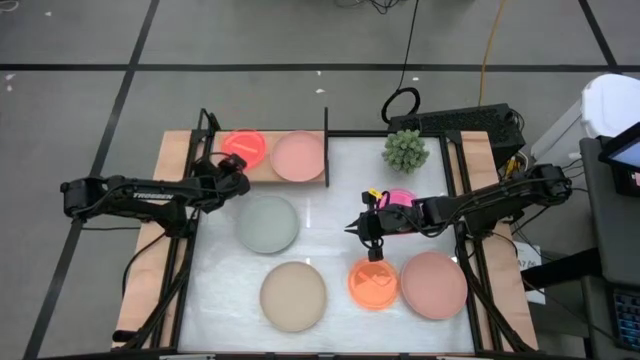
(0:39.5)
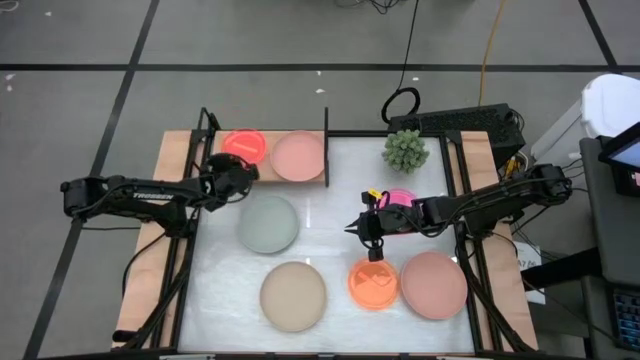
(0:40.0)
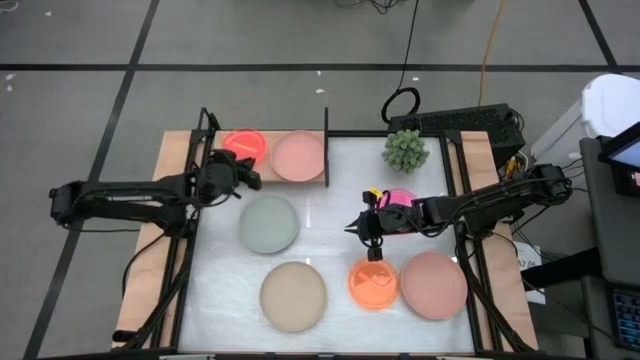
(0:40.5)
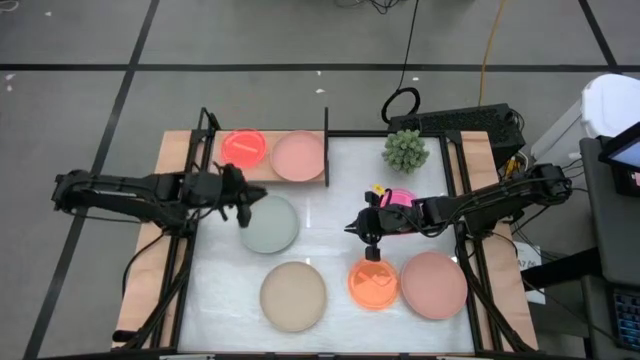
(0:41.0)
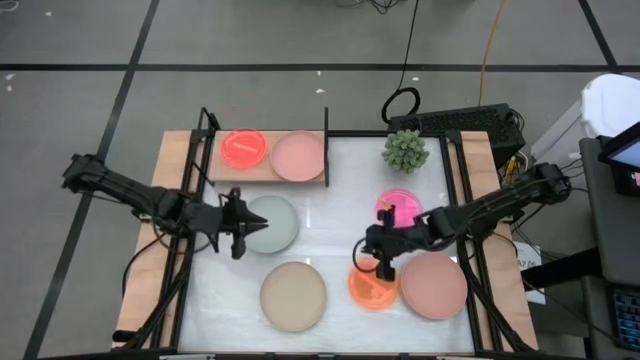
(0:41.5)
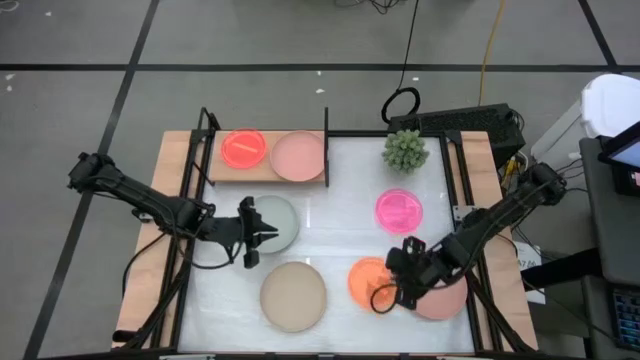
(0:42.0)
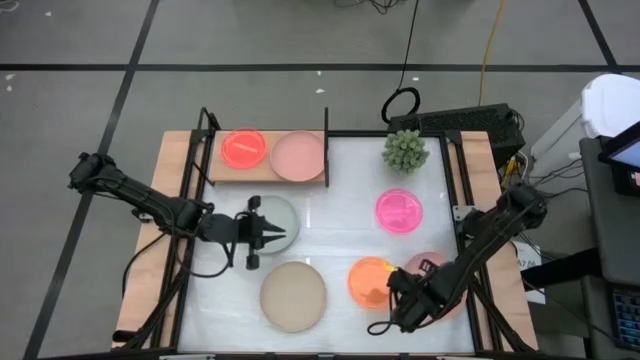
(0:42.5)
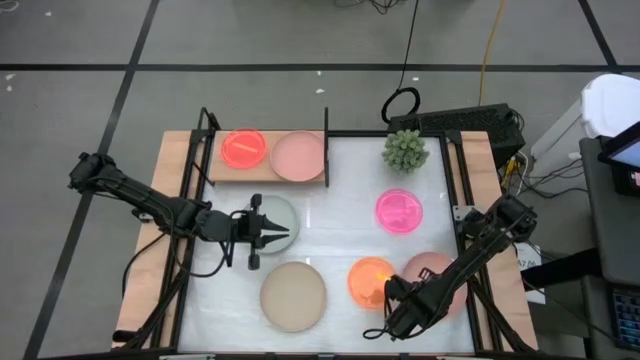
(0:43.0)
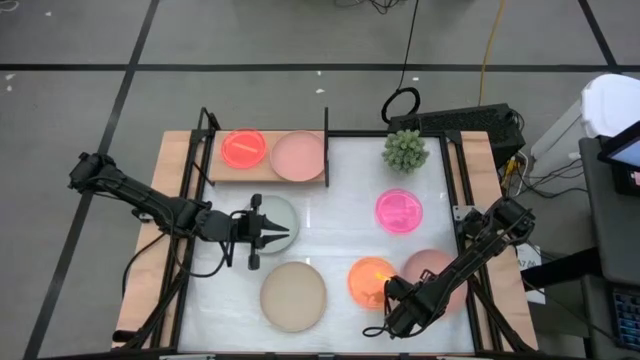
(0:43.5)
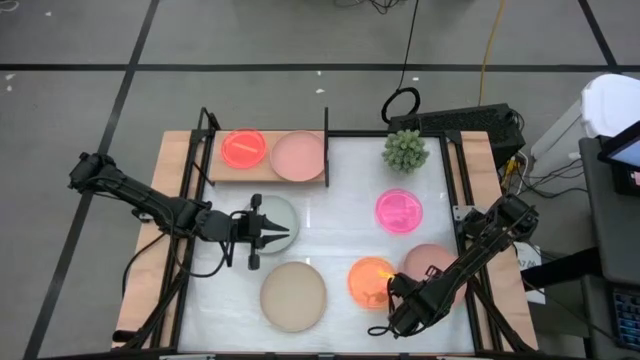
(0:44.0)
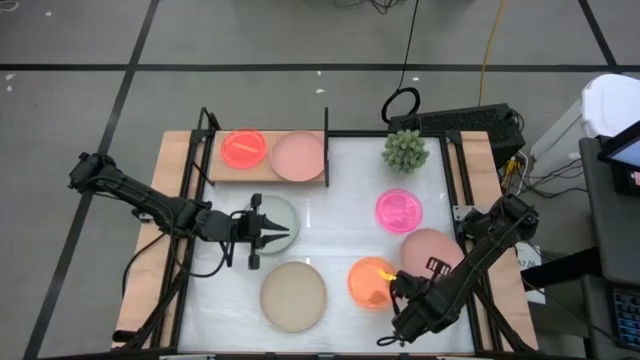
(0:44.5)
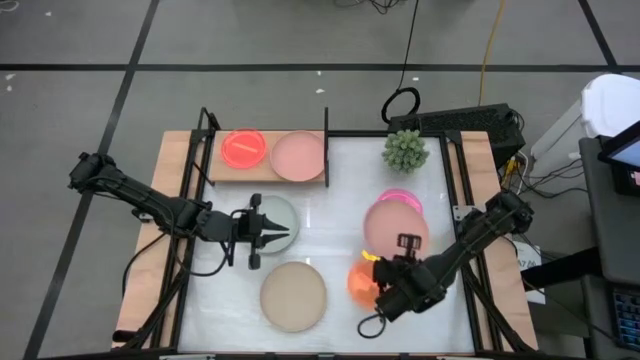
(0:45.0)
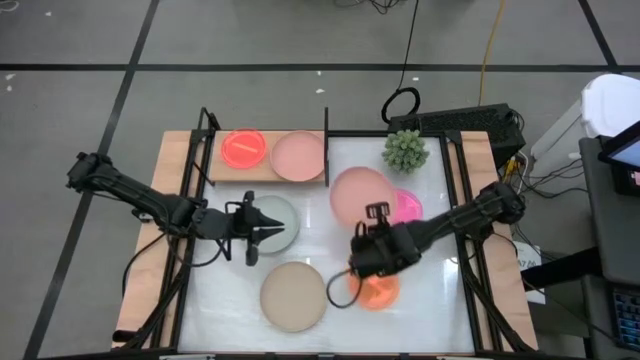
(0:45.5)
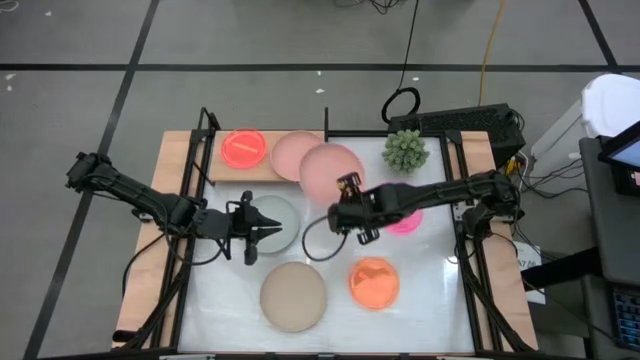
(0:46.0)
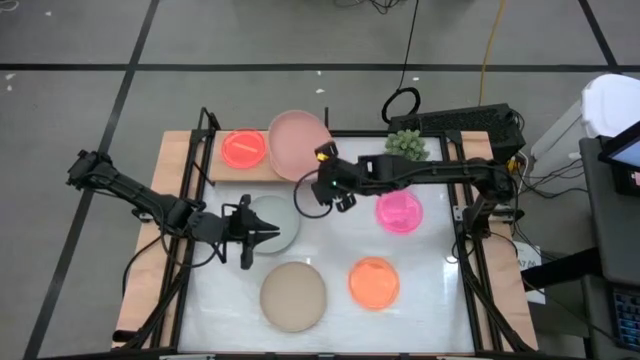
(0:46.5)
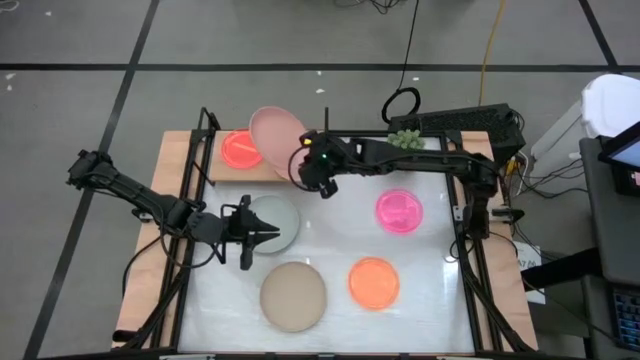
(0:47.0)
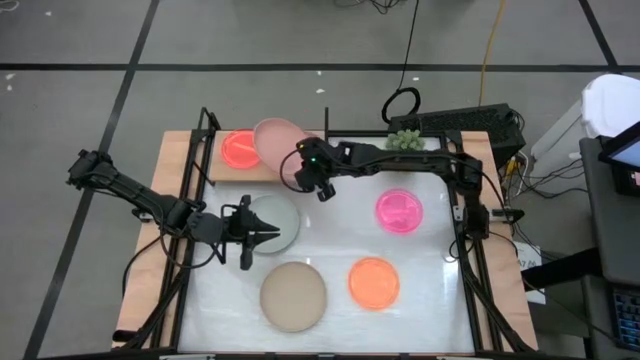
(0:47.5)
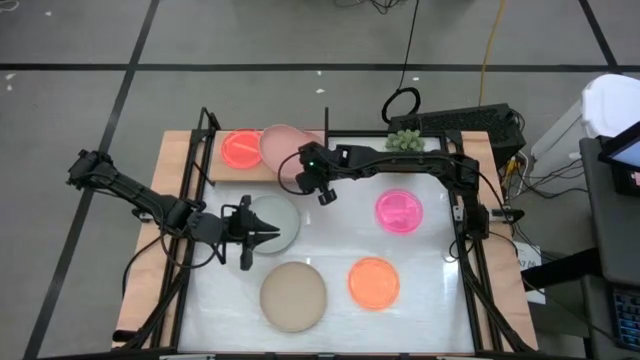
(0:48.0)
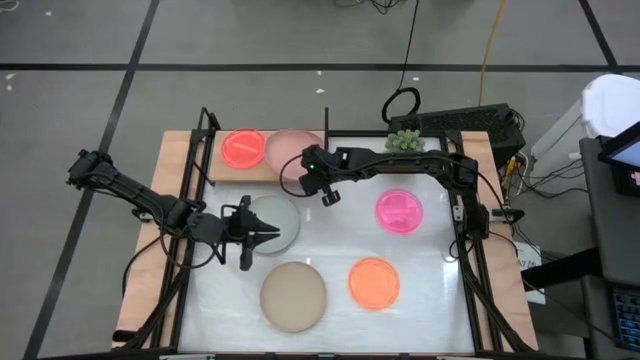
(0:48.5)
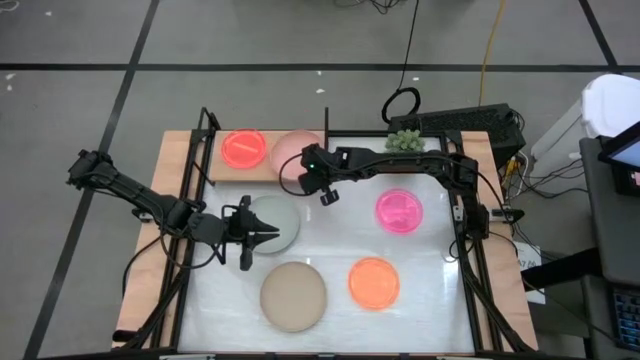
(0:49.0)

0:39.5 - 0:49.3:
Task: Place and stack plates onto a shelf
Stack the brown plate on top of the brown plate on the shelf

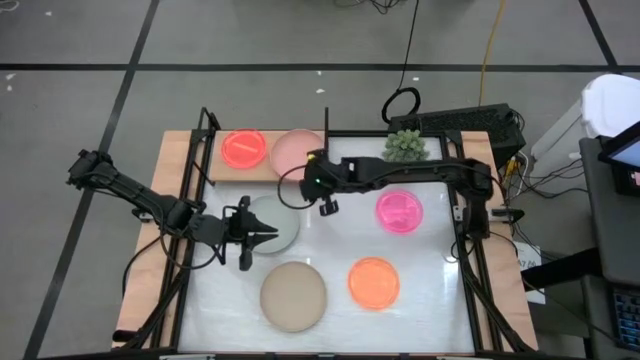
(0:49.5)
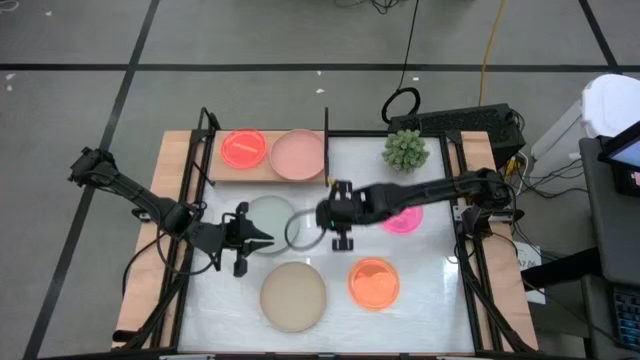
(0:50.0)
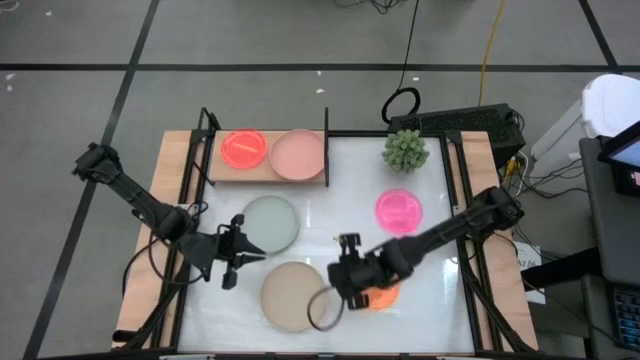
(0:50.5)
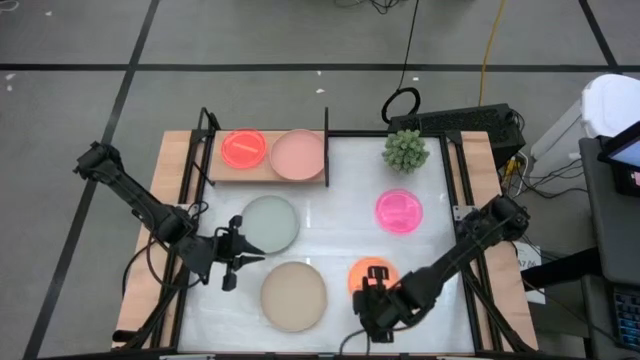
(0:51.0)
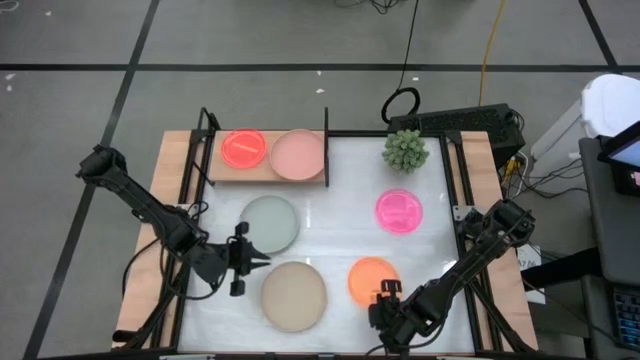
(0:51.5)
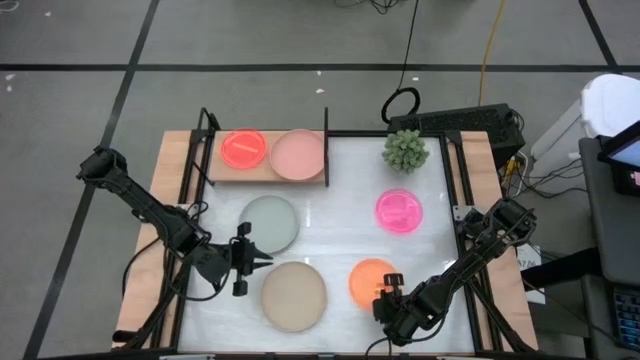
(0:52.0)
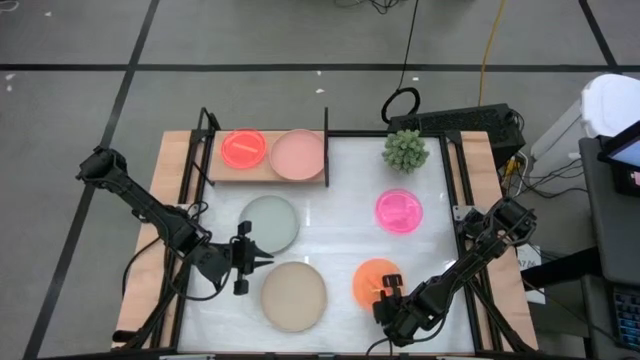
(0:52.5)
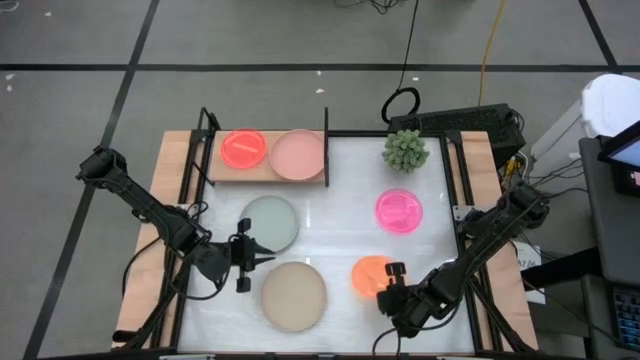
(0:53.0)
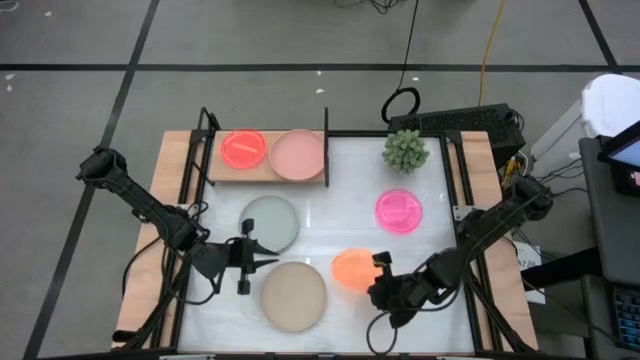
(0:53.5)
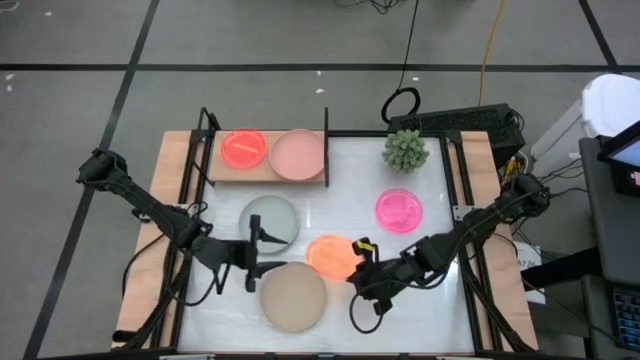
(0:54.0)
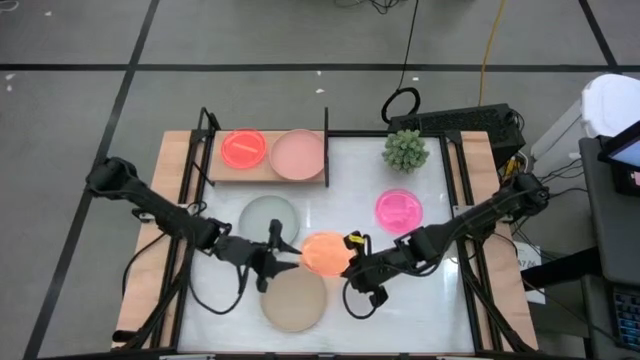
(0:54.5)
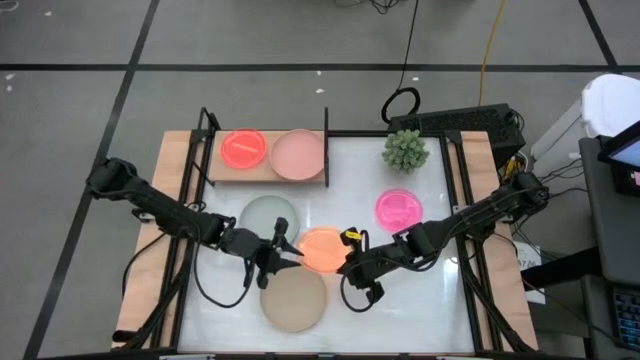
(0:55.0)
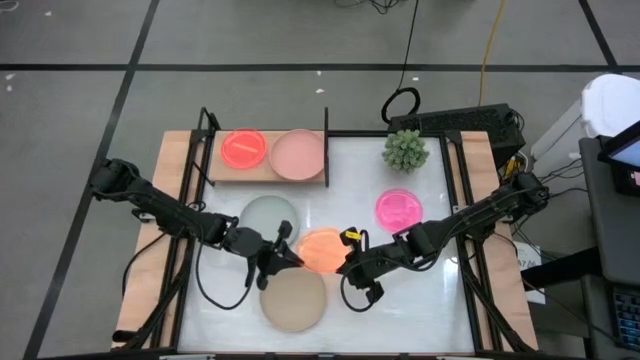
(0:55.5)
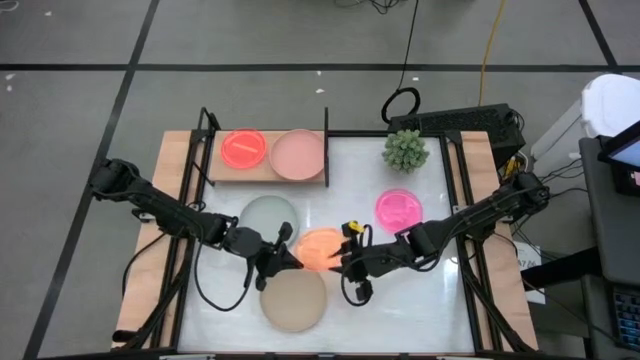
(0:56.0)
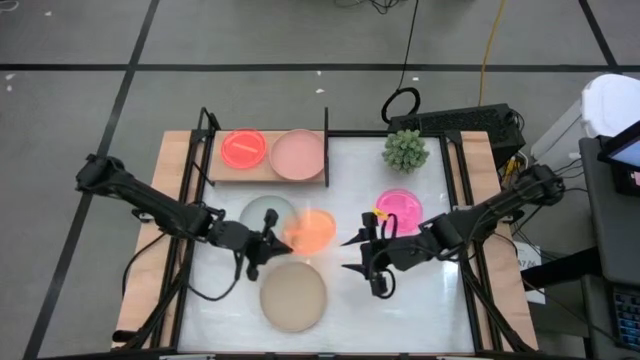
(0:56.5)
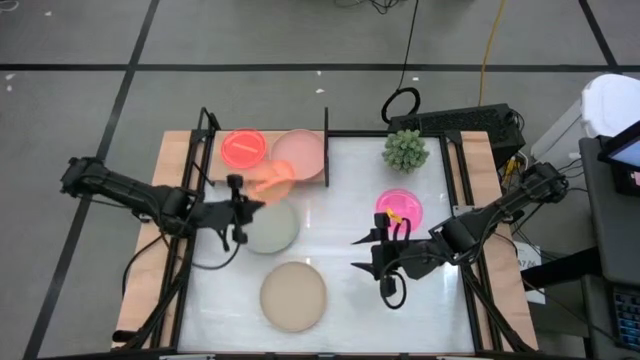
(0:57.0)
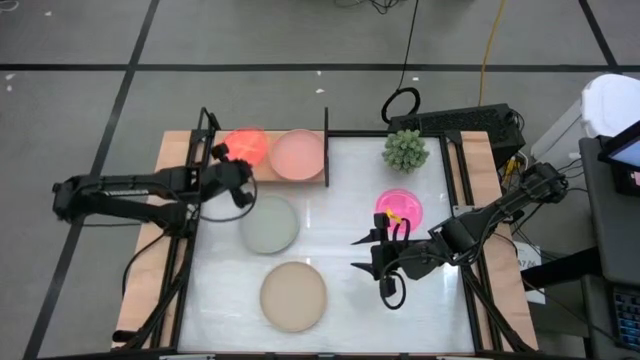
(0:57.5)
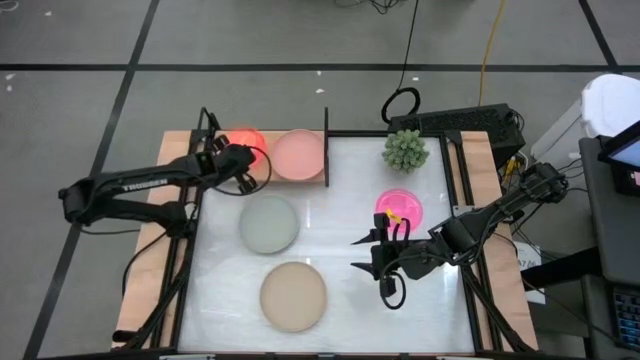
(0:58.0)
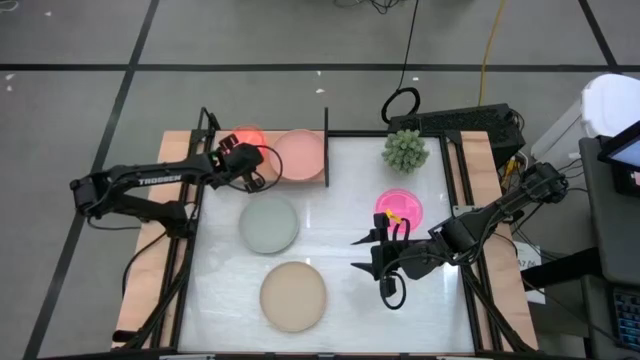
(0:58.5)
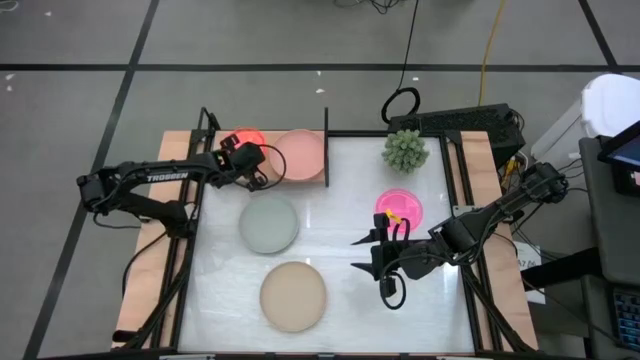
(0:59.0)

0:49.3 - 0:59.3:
Stack the orange plate on the orange plate on the shelf

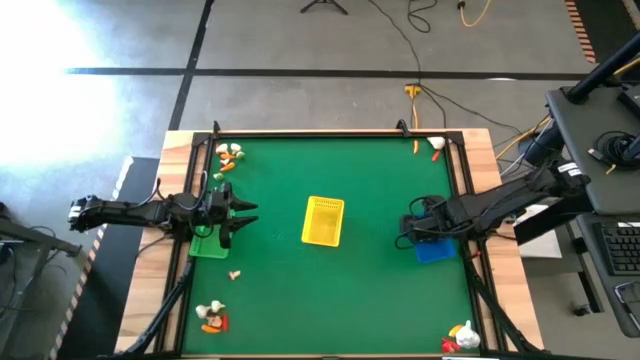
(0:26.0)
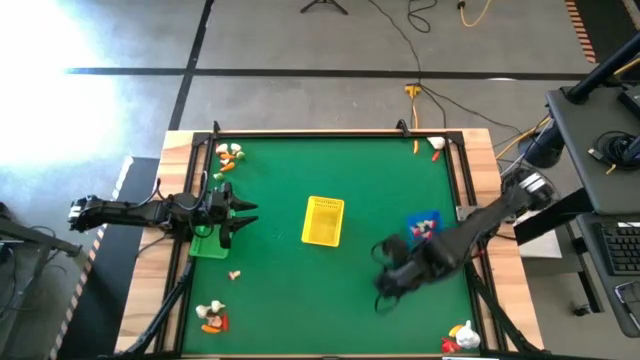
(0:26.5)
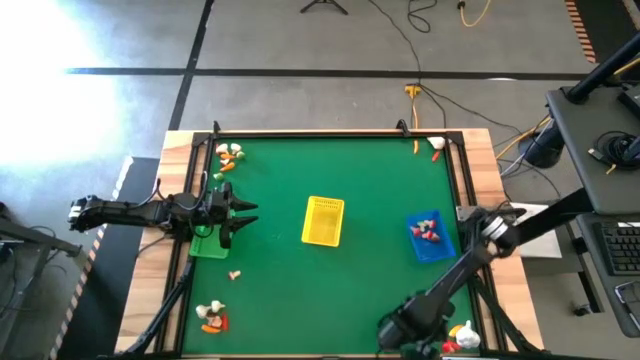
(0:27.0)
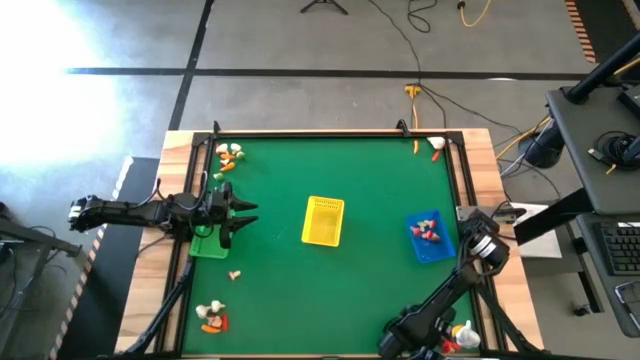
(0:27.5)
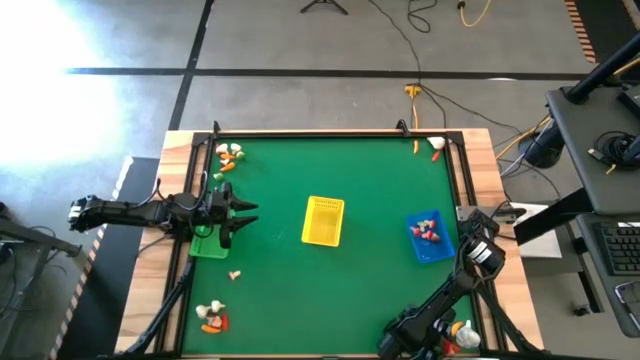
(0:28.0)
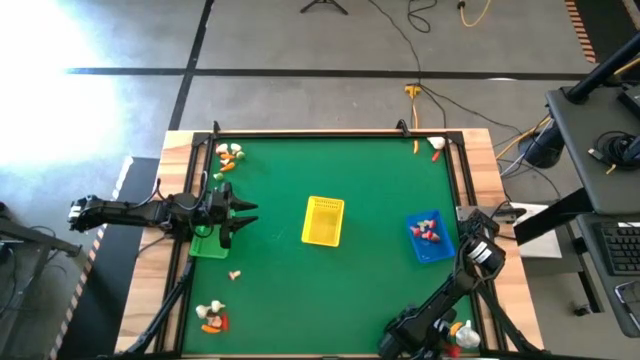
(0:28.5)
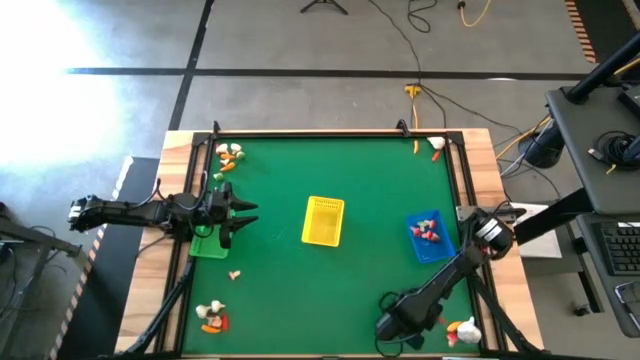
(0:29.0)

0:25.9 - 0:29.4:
Task: Sort produce into baskets
Put the red mushroom into the blue bin
